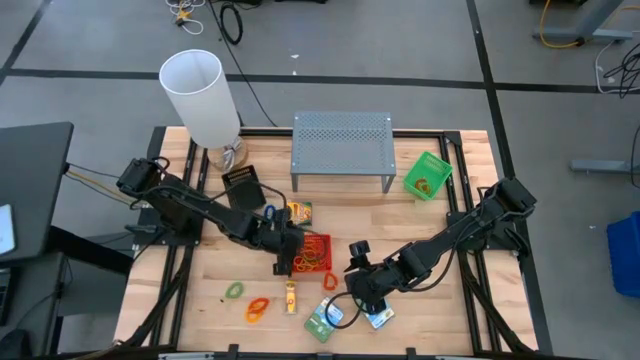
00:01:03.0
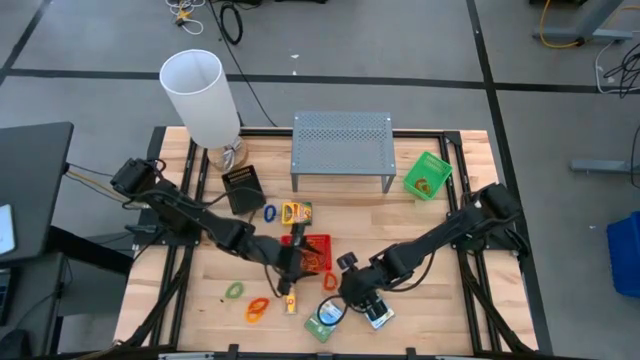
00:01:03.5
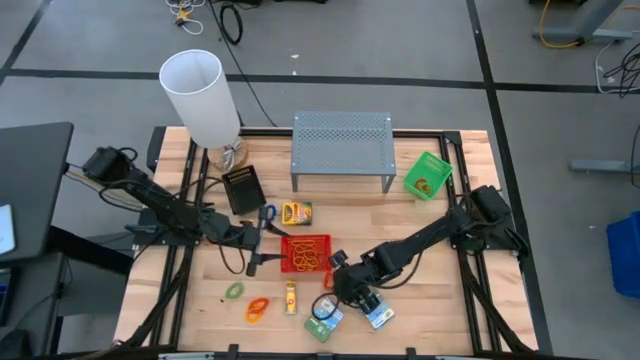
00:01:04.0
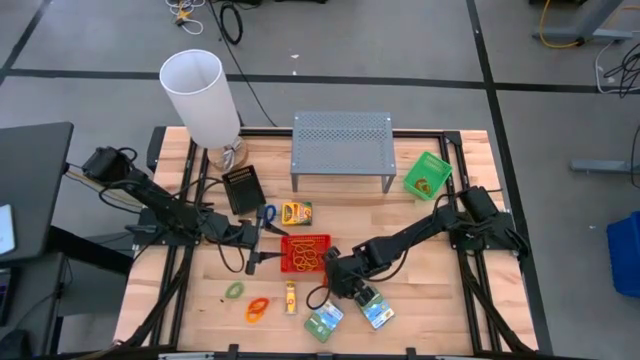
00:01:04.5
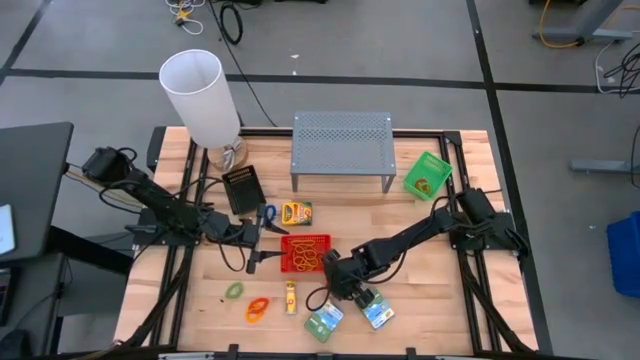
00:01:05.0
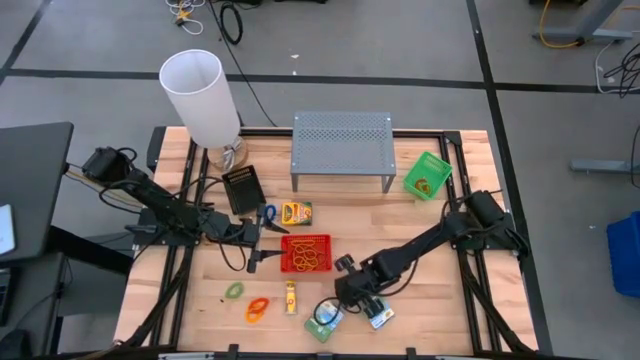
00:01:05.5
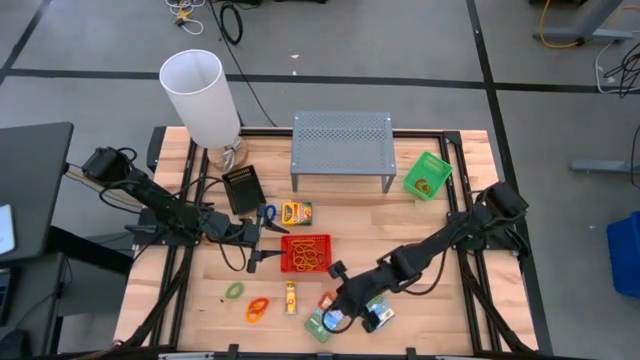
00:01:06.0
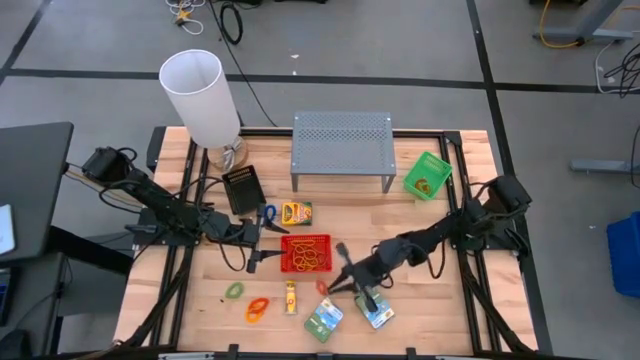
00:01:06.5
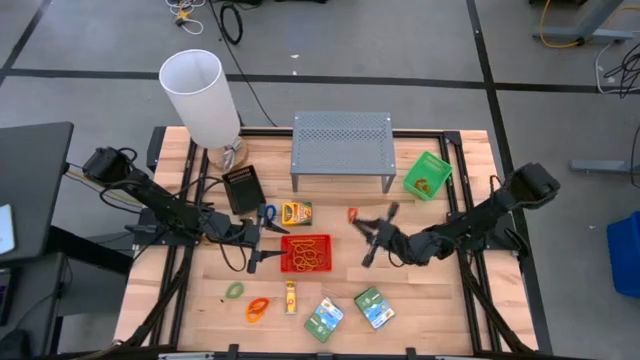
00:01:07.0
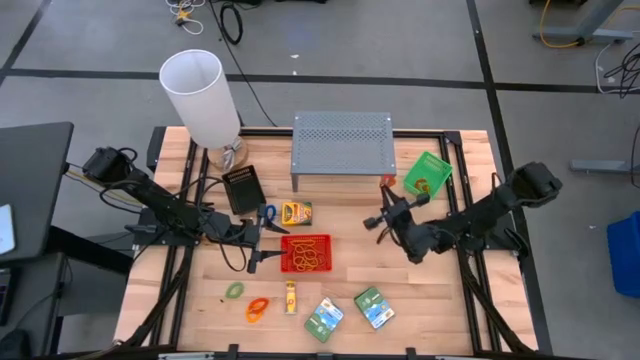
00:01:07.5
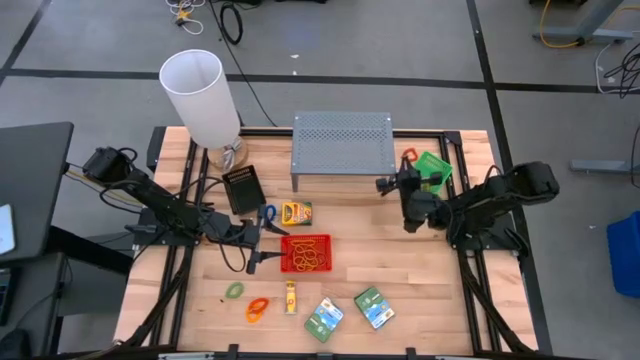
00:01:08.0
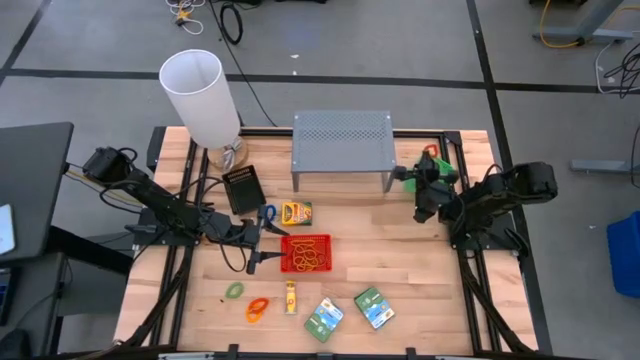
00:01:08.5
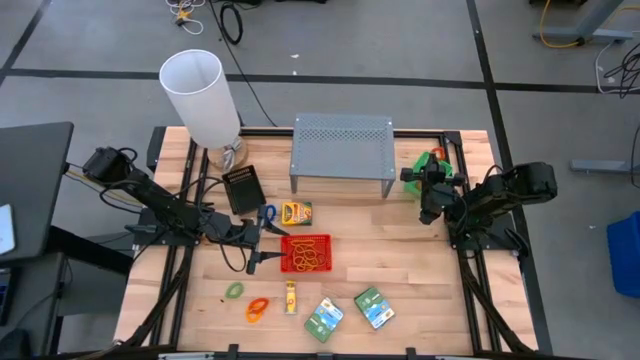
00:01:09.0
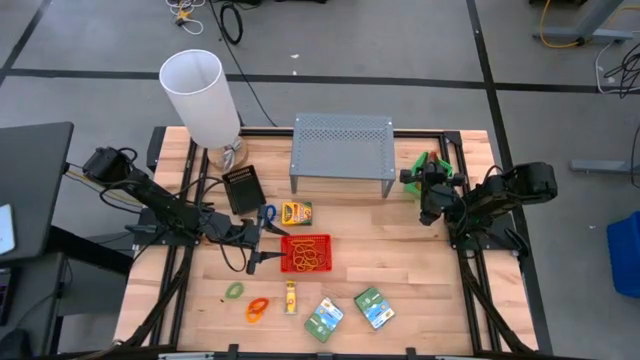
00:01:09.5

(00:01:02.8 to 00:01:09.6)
Task: Pick & Place Office Desk Supplies
Put the orange spring keychain into the green bin

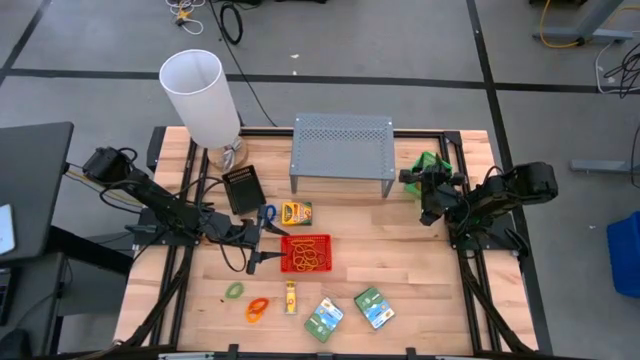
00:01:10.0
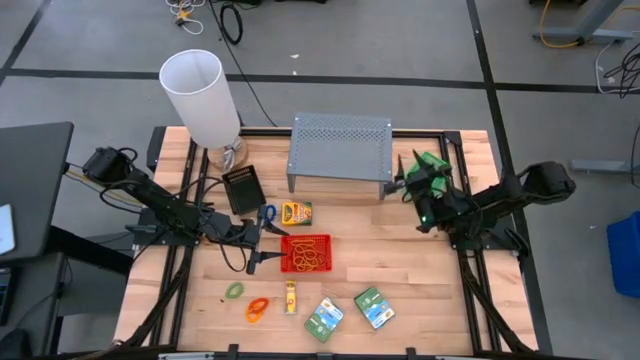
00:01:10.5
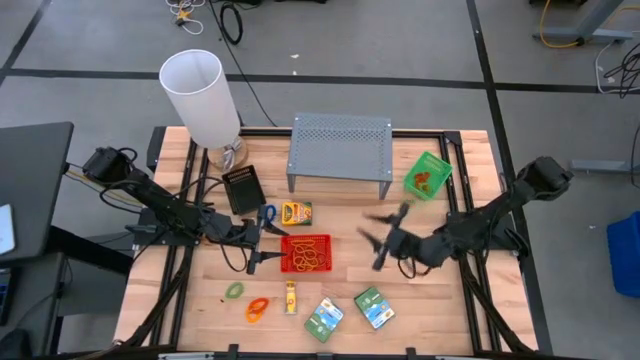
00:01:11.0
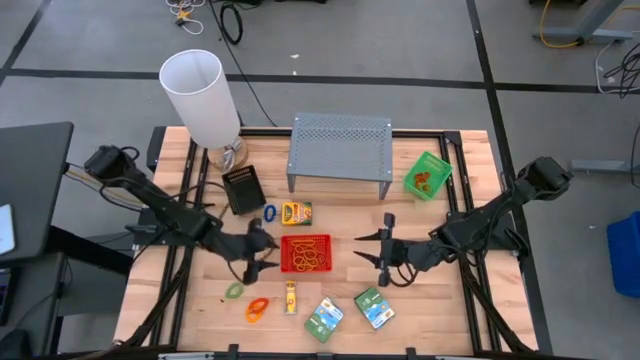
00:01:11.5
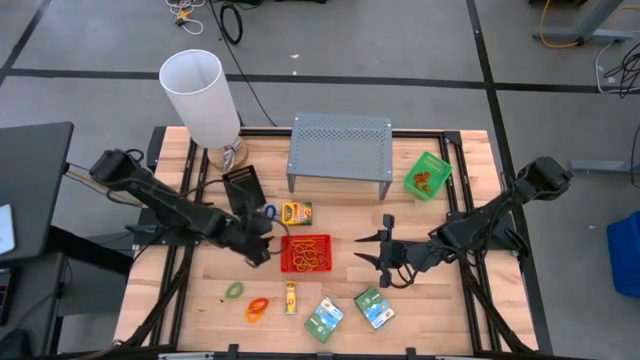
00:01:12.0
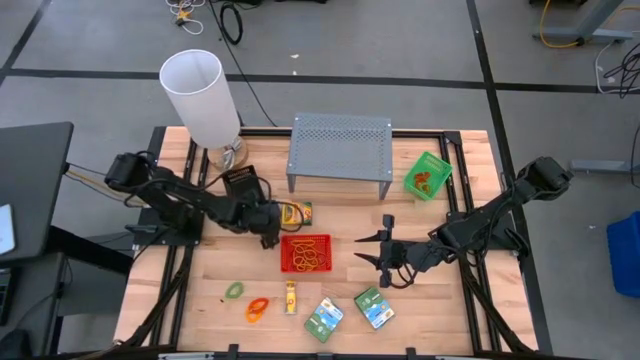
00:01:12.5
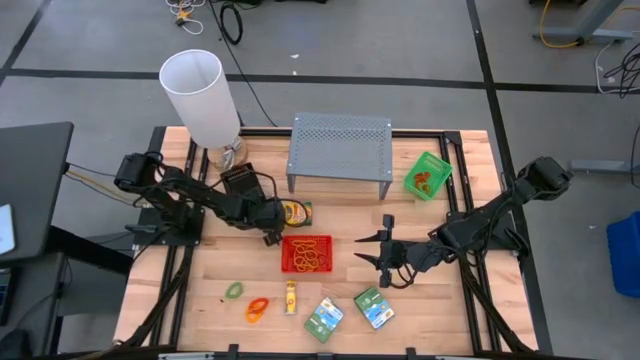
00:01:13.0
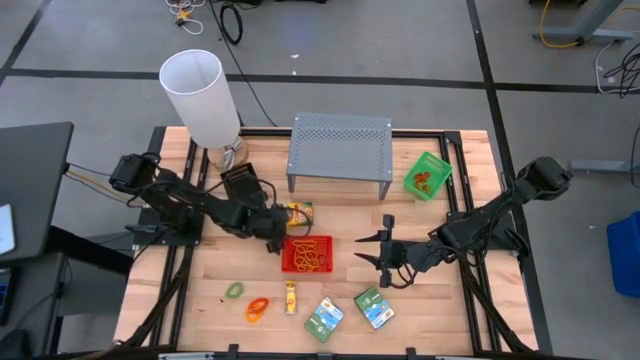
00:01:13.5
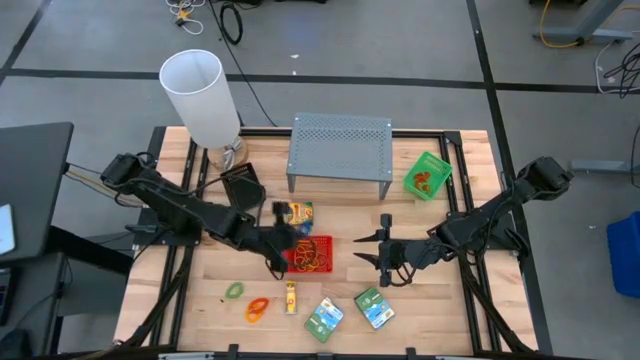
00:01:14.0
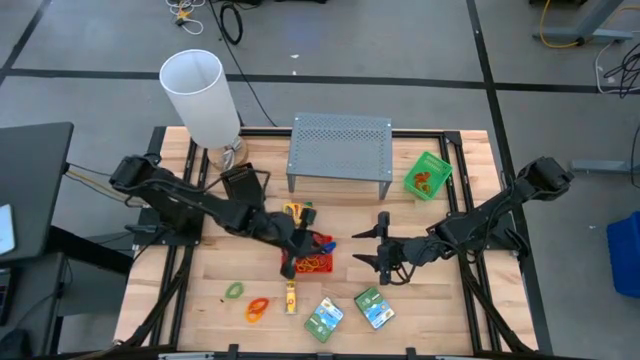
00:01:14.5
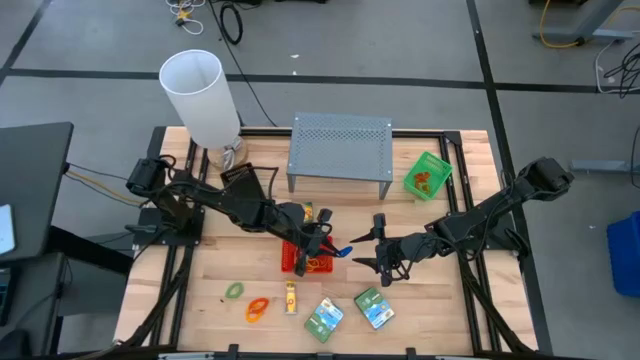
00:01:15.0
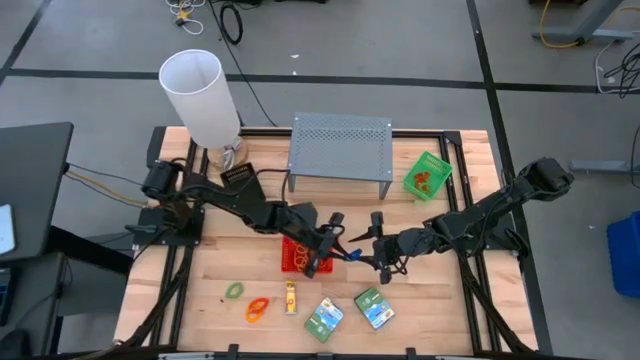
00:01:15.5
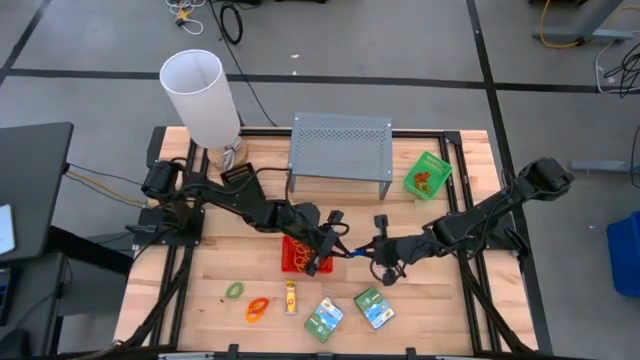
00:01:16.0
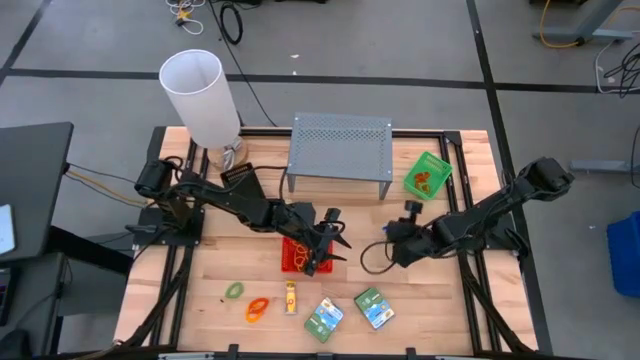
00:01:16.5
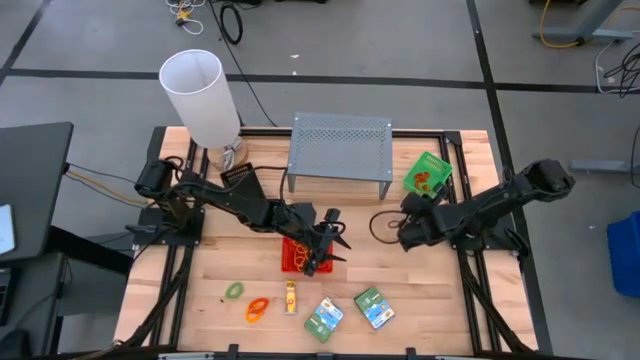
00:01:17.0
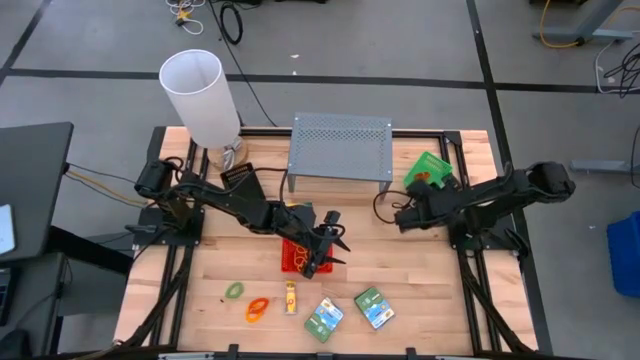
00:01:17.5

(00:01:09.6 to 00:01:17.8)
Put the blue spring keychain into the green bin

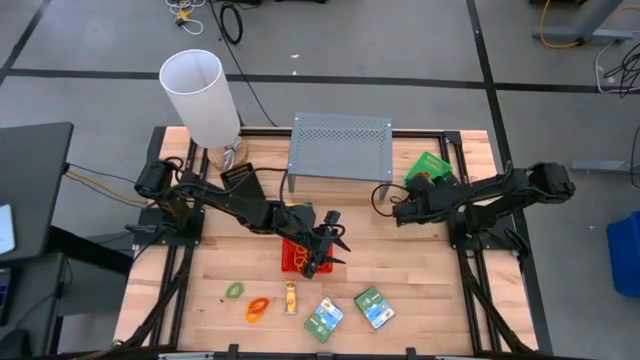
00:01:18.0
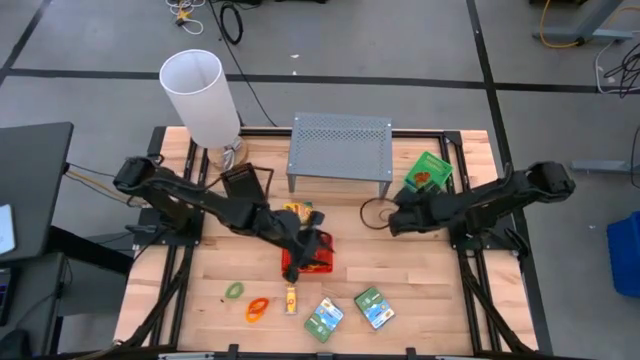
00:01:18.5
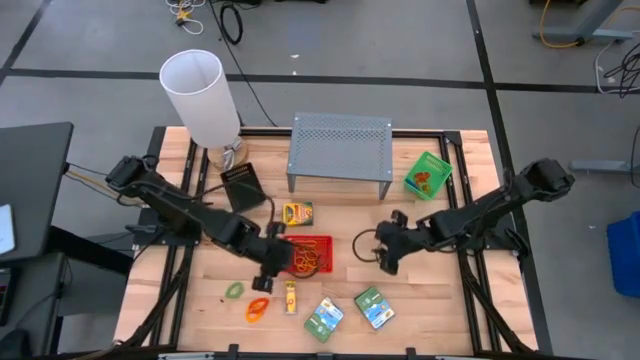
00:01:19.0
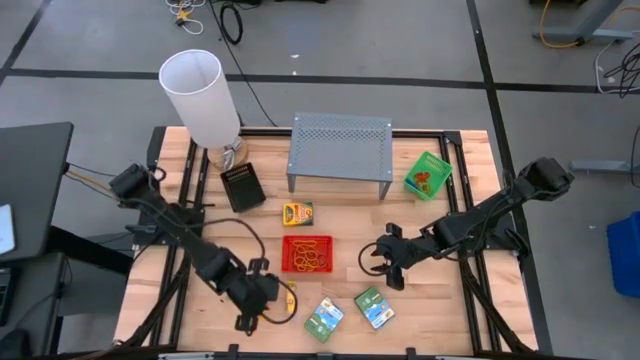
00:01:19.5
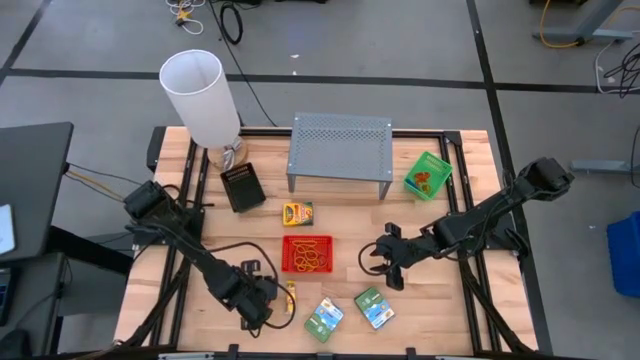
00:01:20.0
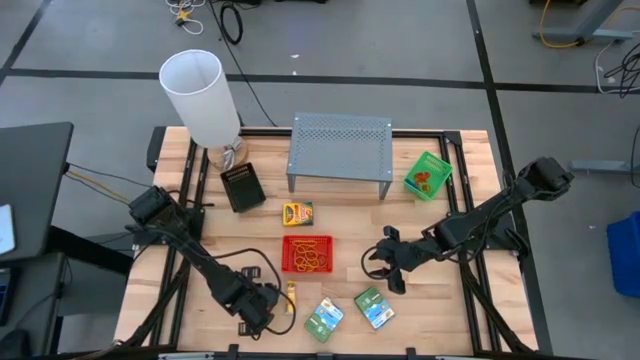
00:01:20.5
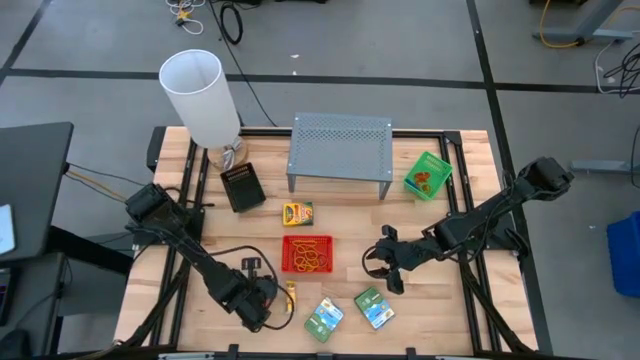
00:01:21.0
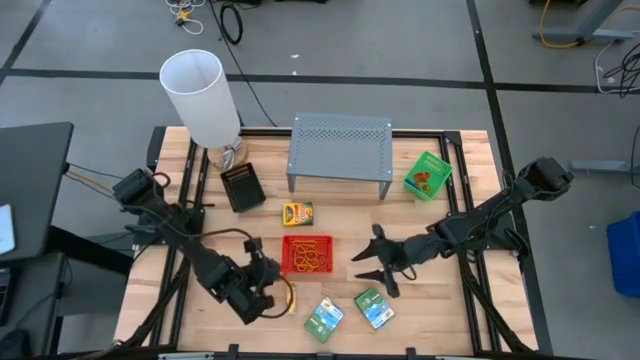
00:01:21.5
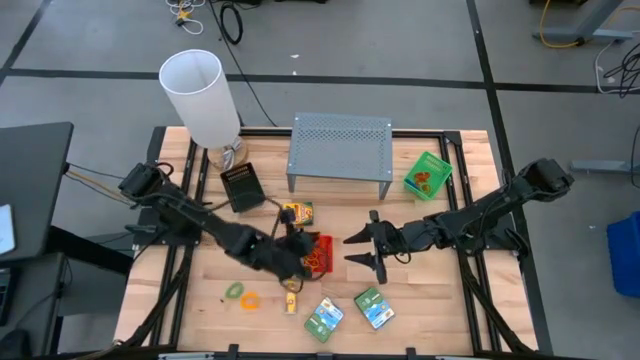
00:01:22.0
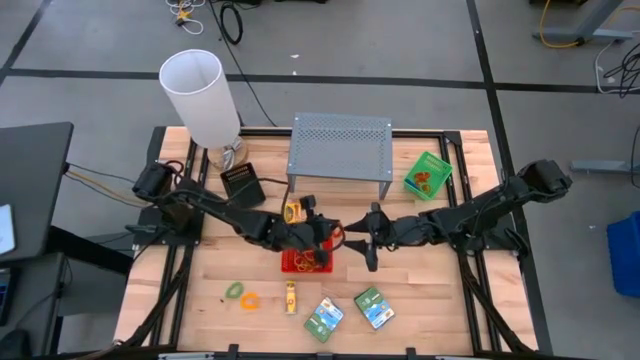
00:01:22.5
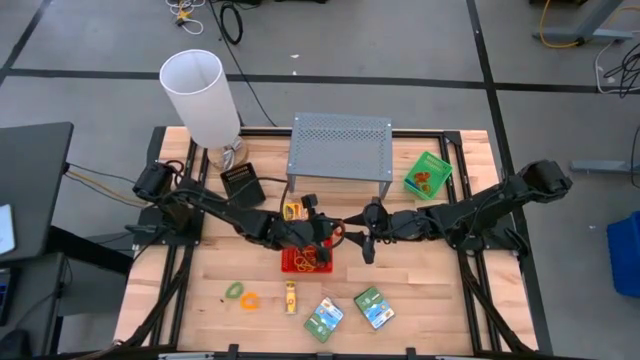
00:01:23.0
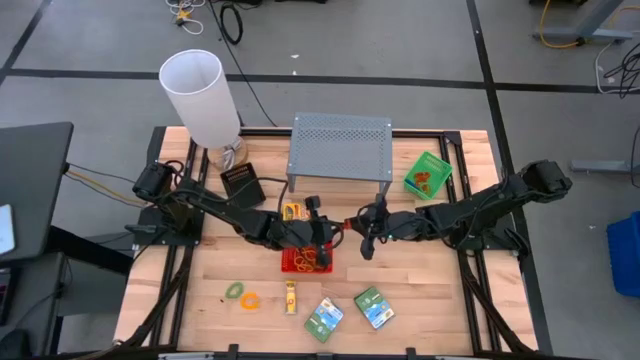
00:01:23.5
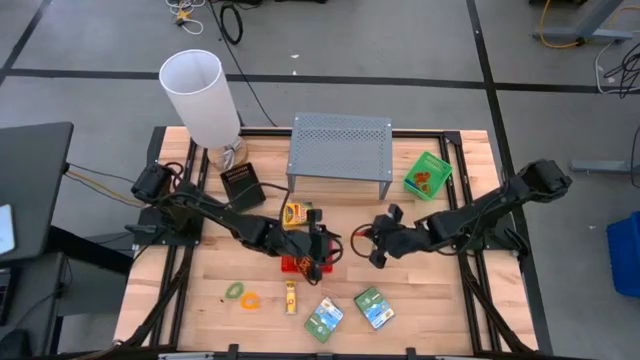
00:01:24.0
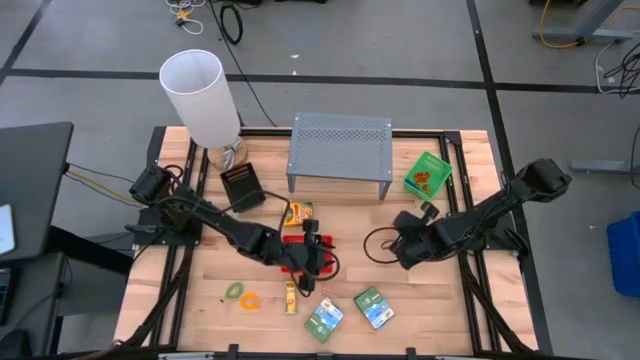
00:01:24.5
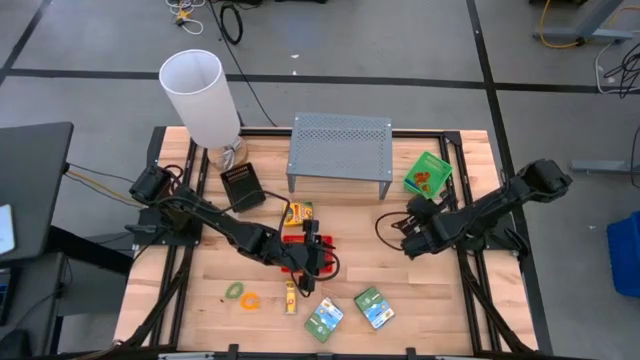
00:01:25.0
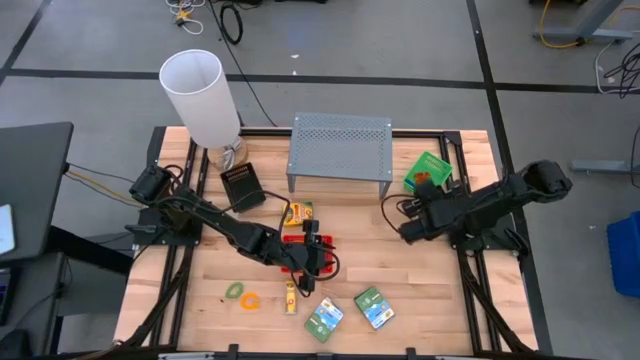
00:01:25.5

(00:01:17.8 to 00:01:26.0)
Put the orange spring keychain into the green bin
